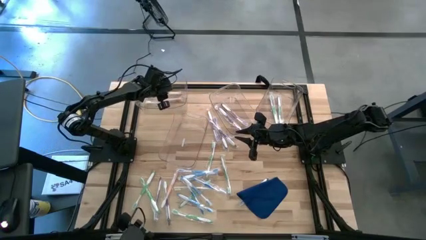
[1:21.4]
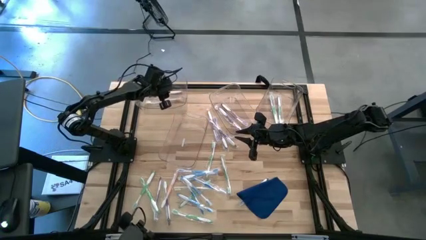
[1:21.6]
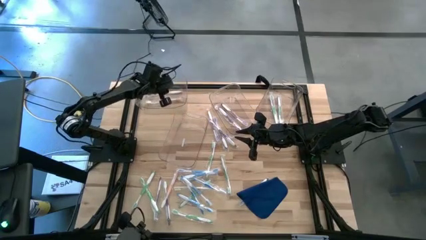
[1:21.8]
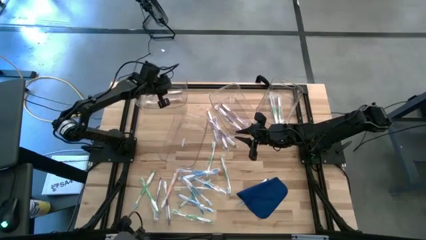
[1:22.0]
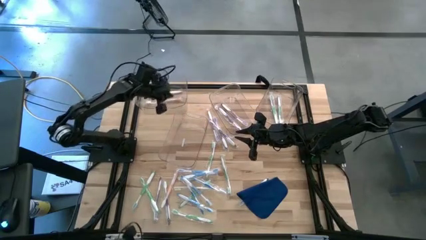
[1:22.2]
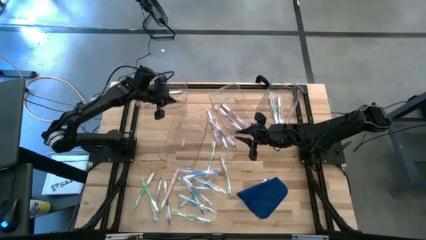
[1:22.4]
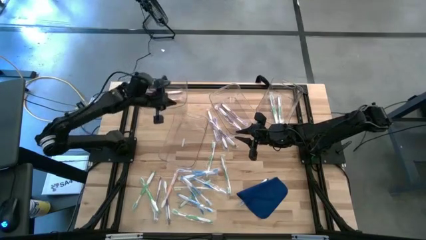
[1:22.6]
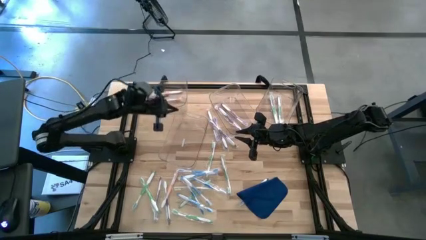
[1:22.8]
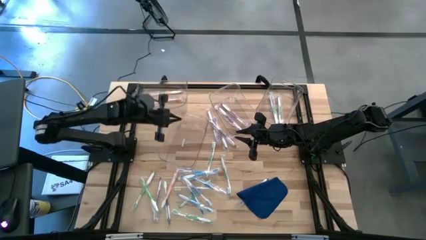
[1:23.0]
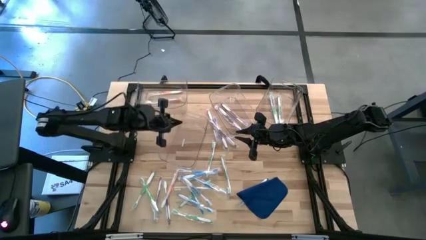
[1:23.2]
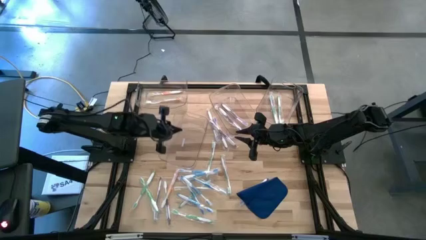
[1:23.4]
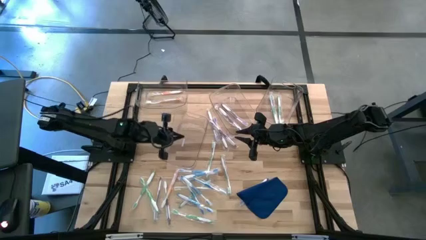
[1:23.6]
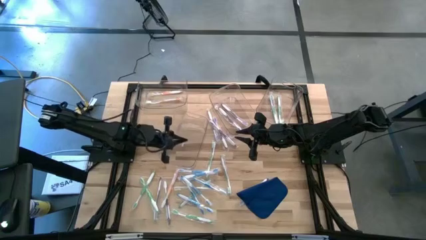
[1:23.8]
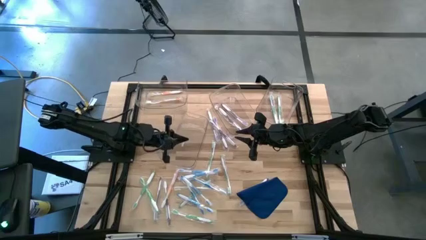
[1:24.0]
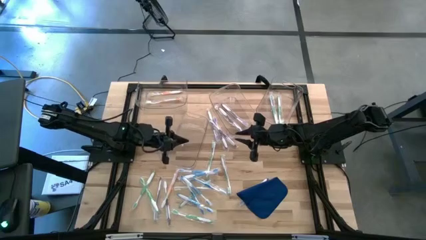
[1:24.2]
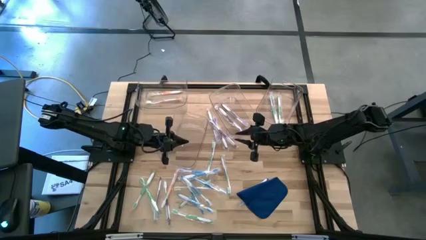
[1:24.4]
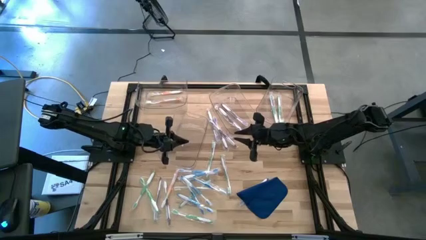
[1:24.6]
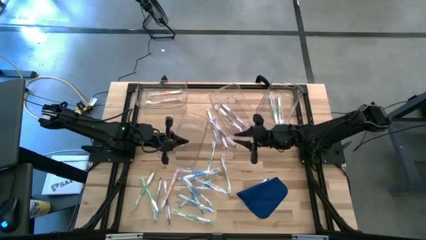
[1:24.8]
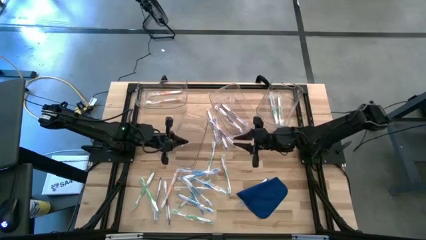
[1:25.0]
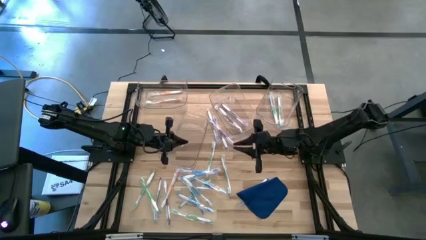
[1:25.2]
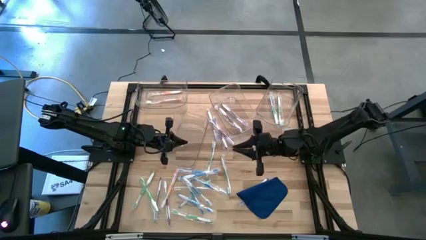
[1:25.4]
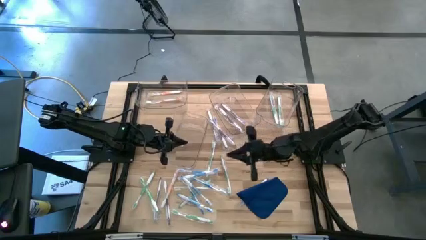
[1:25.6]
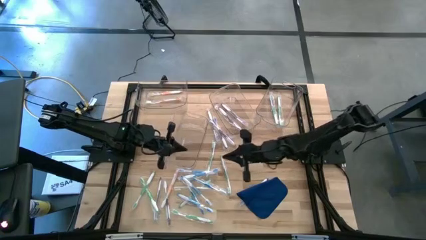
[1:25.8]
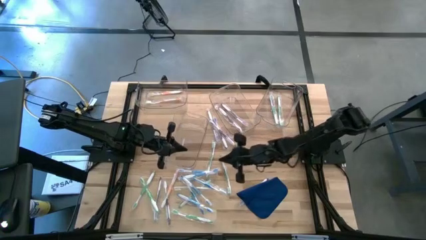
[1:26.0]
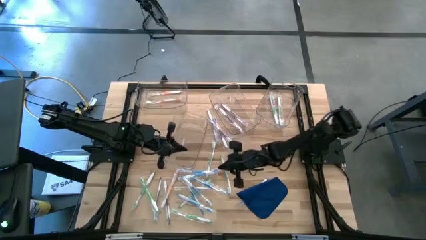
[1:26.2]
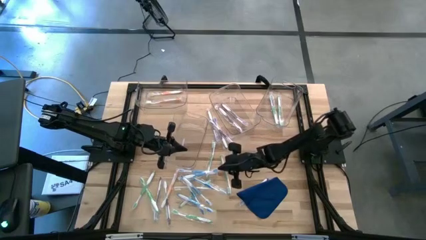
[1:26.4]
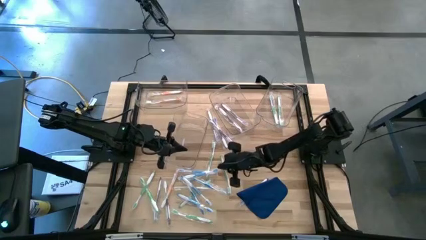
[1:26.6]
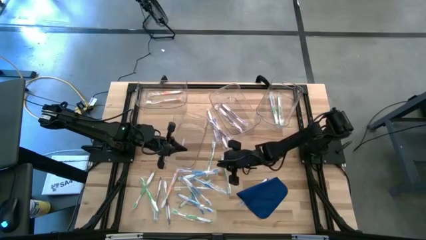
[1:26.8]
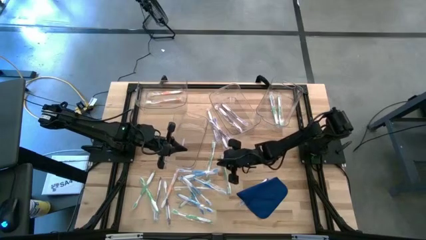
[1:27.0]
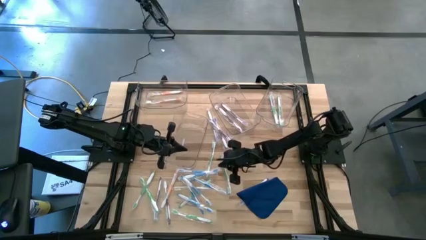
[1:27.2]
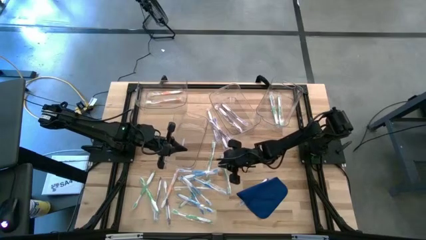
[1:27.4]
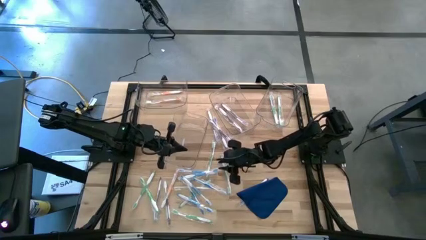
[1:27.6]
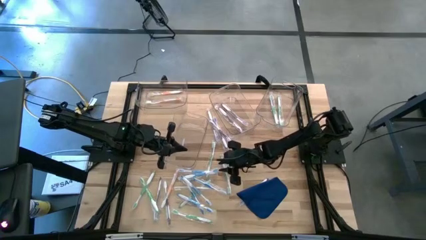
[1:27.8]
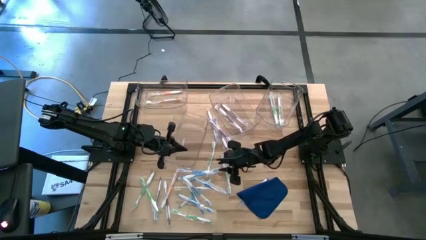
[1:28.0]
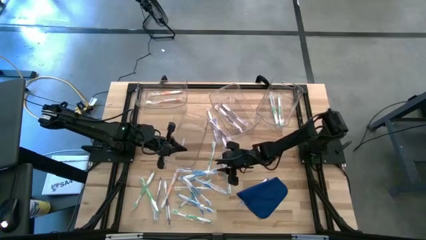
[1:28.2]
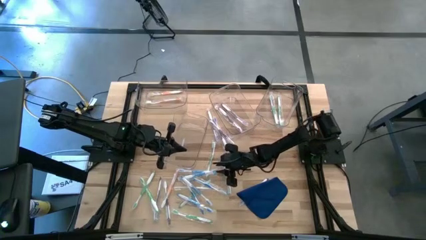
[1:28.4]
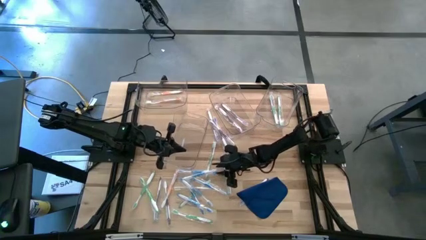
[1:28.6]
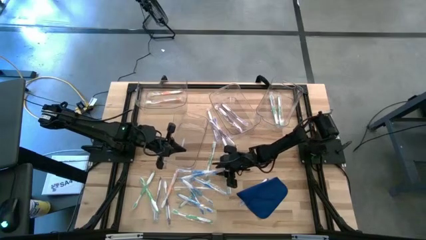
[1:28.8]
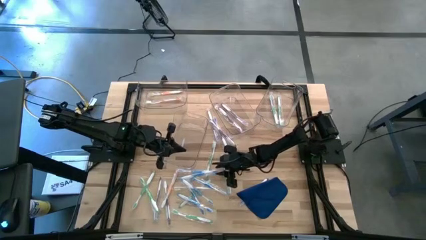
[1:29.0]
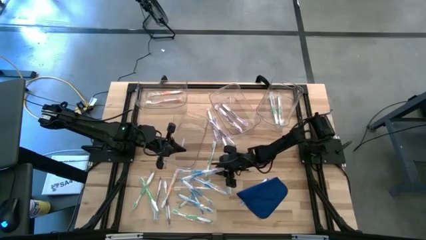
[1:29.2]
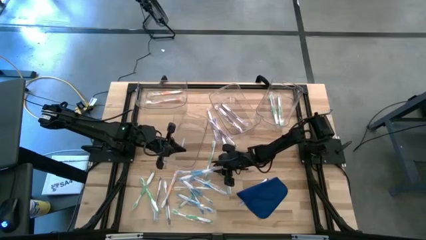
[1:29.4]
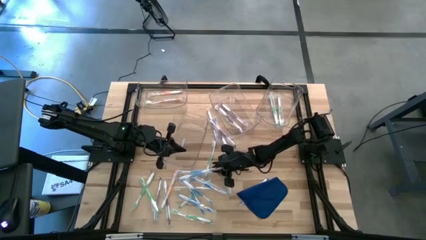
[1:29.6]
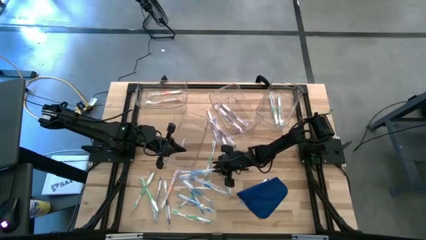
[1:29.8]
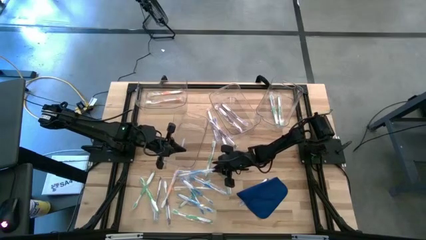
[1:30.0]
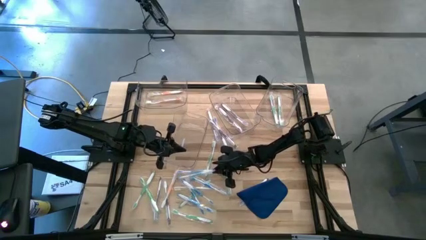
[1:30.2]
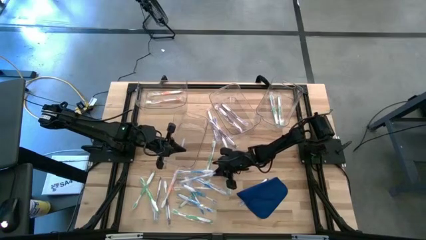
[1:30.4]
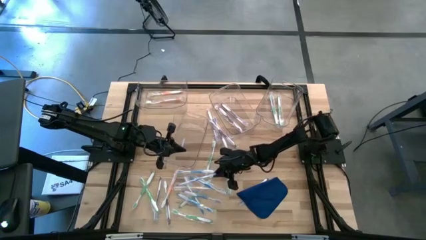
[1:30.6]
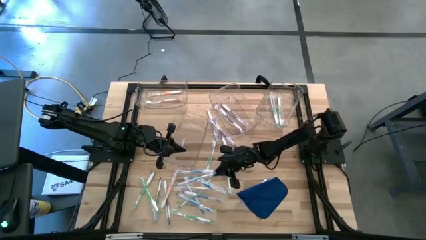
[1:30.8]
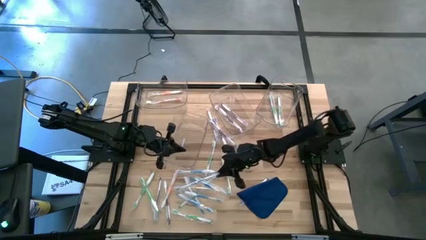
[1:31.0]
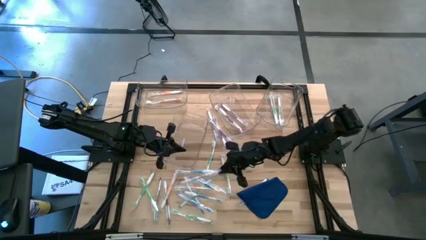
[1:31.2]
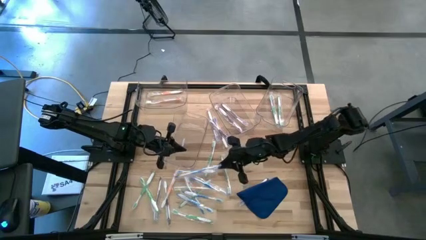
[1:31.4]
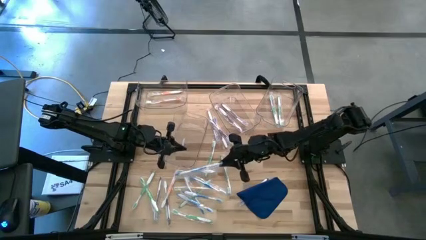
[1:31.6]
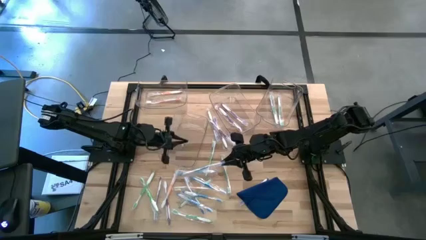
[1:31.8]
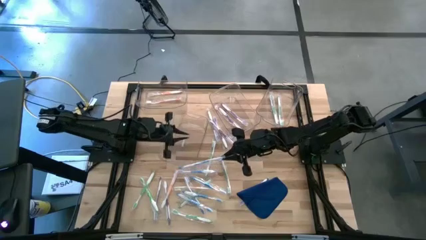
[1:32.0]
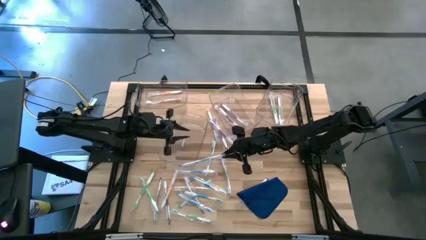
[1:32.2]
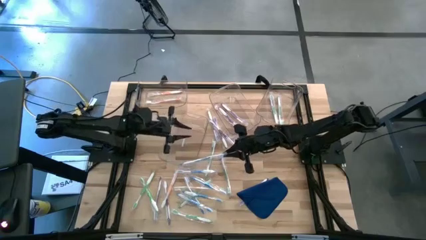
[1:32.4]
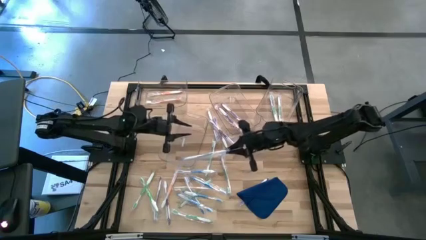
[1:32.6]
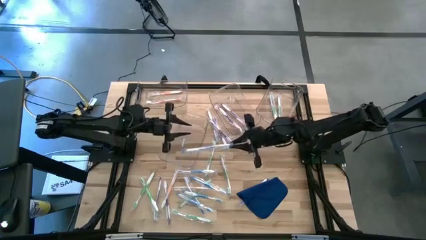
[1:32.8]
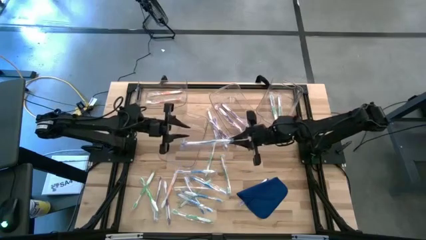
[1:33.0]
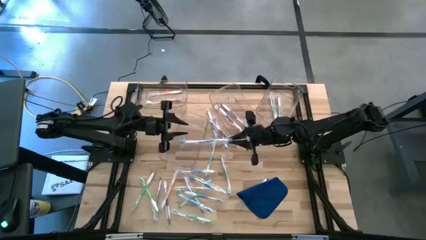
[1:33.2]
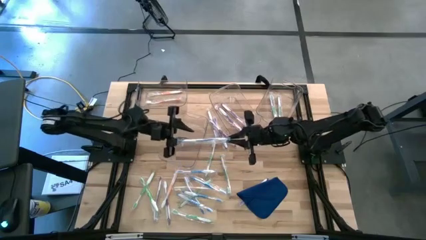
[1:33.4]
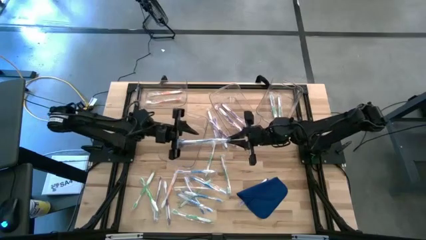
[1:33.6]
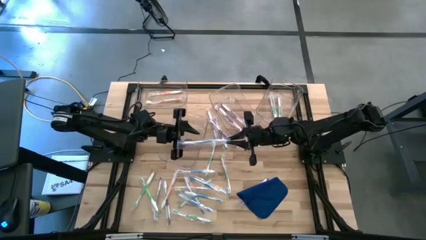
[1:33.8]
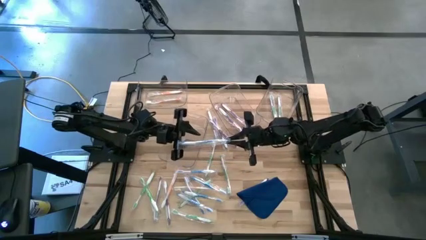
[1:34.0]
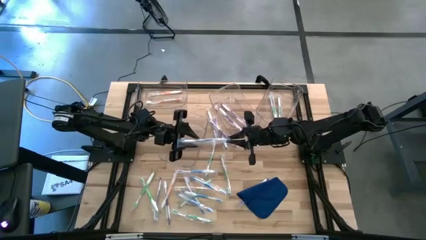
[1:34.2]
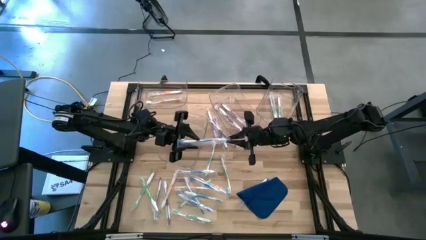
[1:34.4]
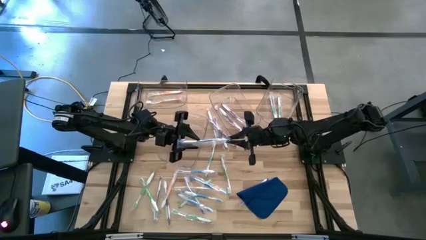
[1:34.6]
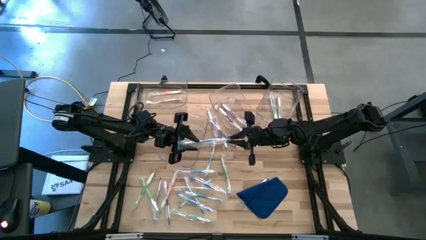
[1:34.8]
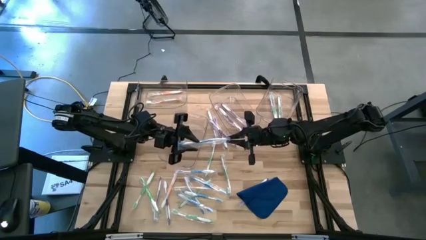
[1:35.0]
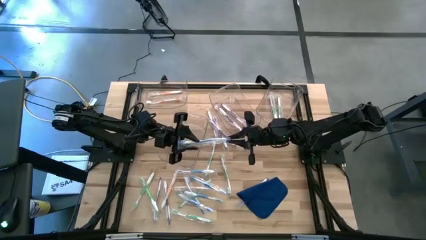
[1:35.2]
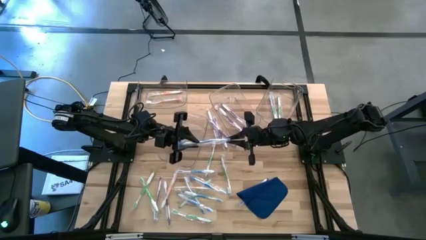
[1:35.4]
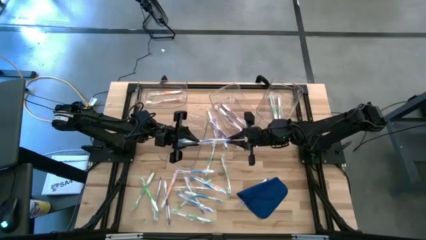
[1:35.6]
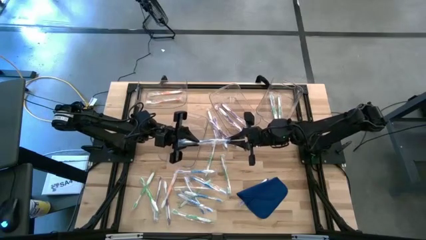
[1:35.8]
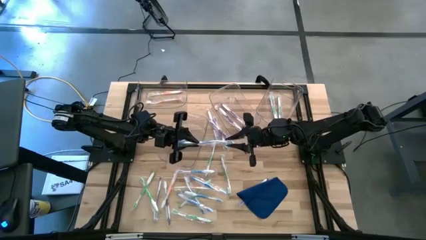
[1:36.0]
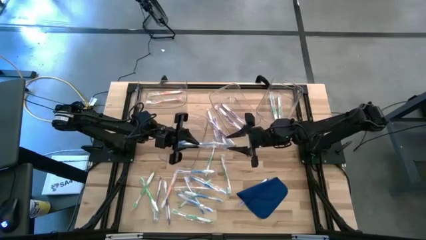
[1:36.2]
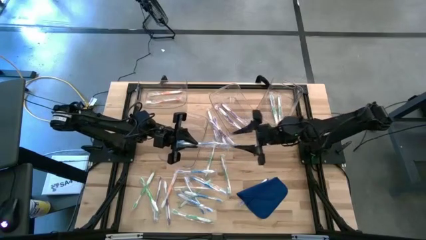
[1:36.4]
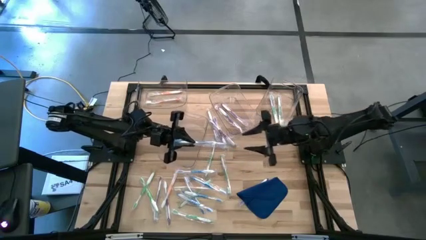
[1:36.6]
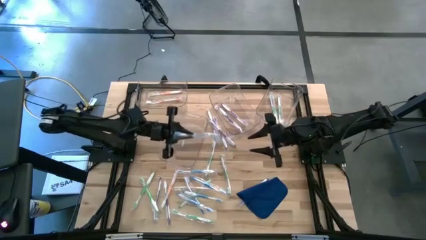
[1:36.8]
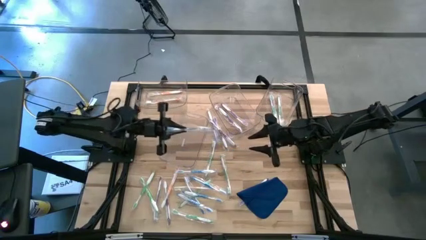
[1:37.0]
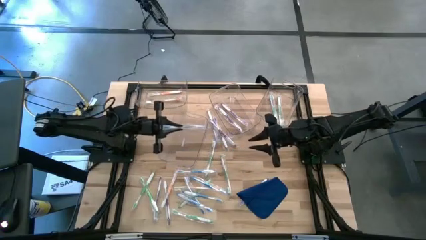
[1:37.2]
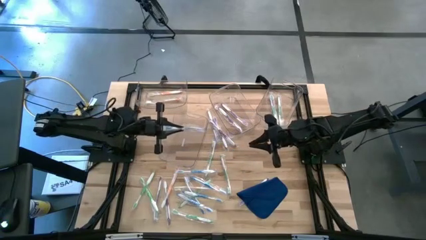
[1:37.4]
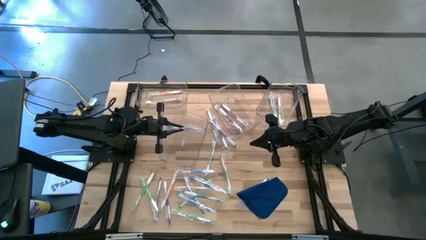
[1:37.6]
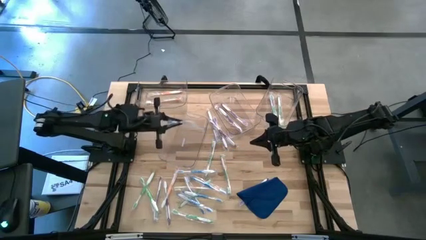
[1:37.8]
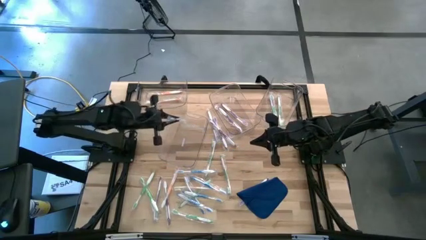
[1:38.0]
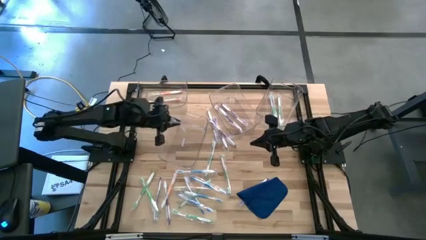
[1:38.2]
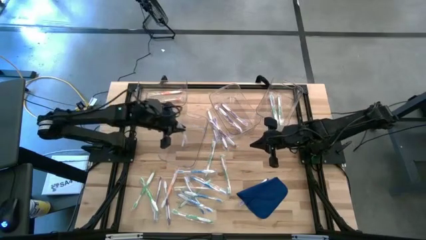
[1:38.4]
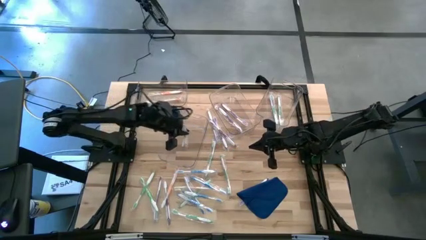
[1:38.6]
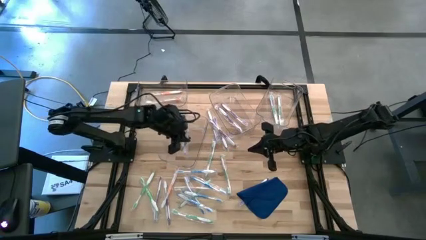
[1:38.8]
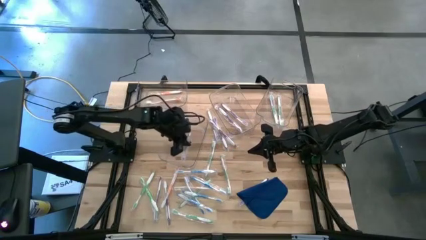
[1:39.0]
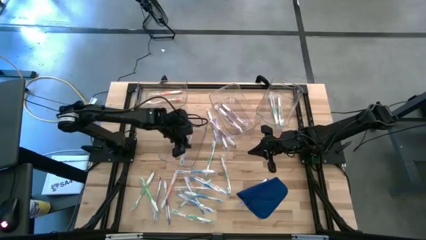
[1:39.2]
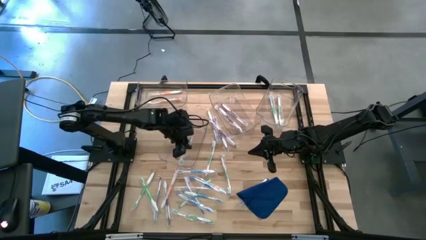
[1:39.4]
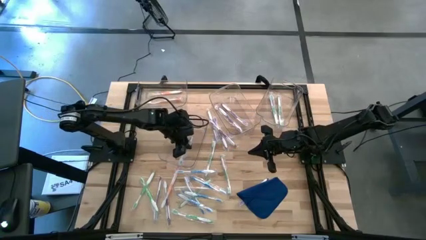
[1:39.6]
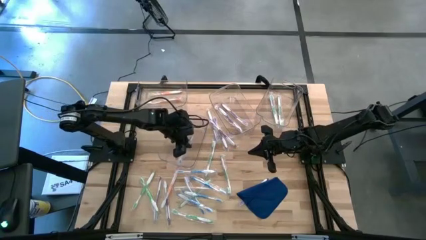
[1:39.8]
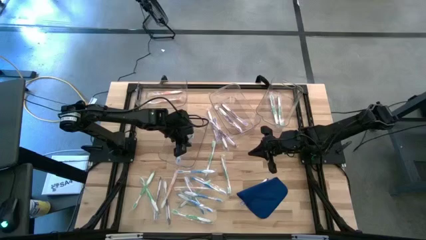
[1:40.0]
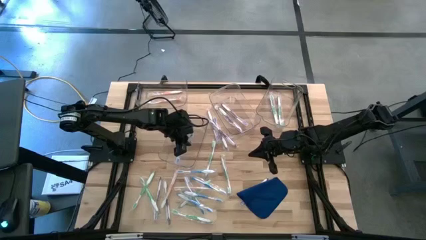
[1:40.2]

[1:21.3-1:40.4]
Task: Pick & Place Toothbrushes
Put the blue toothbrush into the bottom transparent bin
